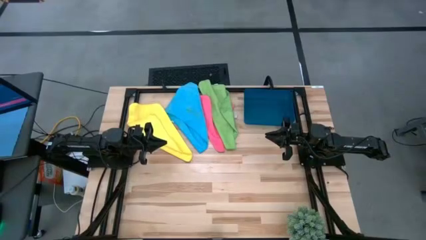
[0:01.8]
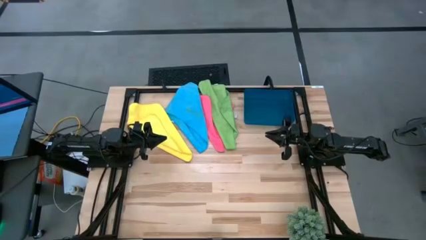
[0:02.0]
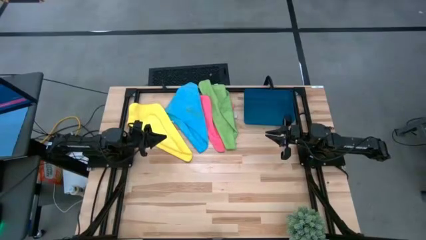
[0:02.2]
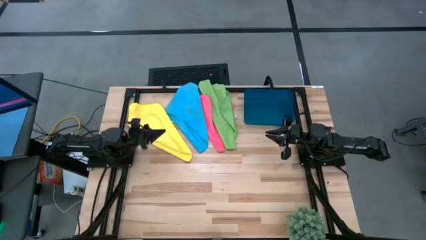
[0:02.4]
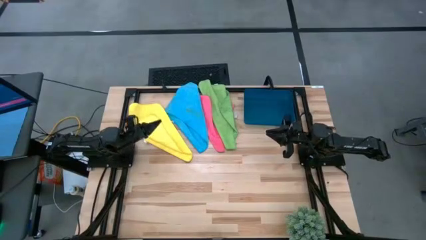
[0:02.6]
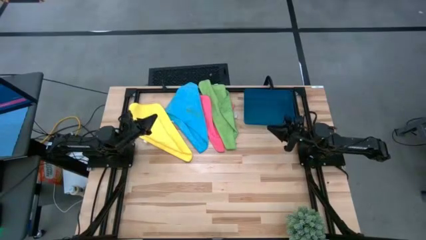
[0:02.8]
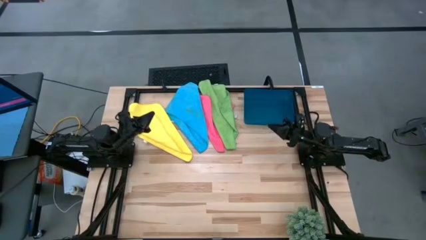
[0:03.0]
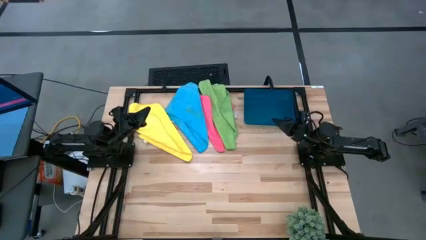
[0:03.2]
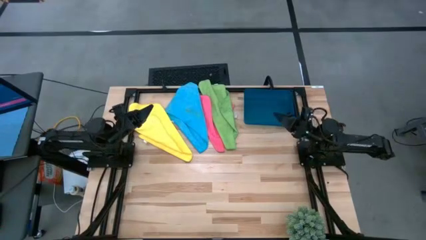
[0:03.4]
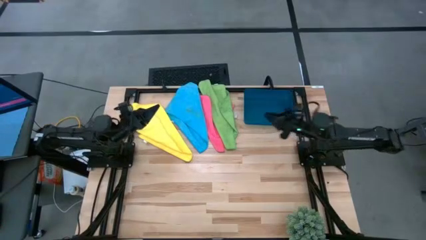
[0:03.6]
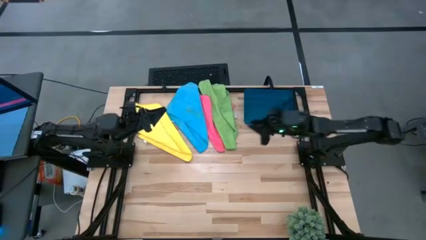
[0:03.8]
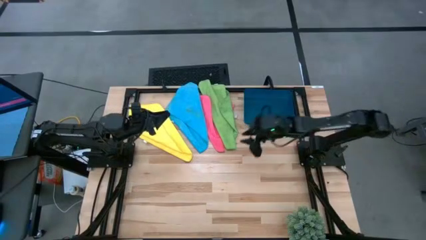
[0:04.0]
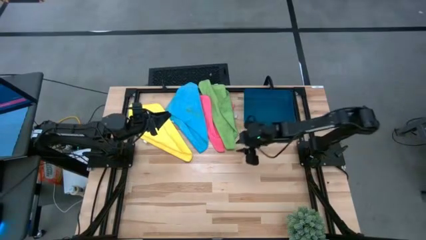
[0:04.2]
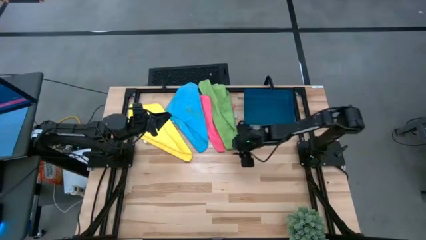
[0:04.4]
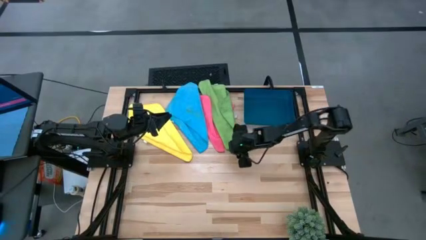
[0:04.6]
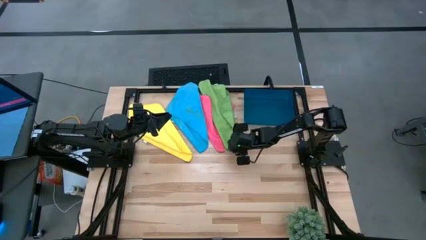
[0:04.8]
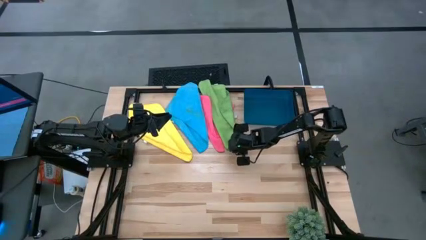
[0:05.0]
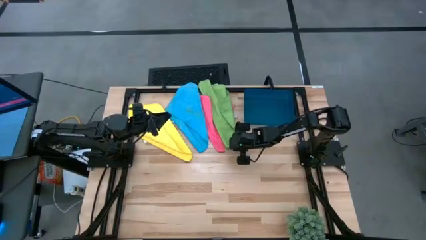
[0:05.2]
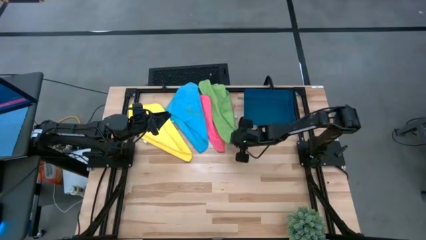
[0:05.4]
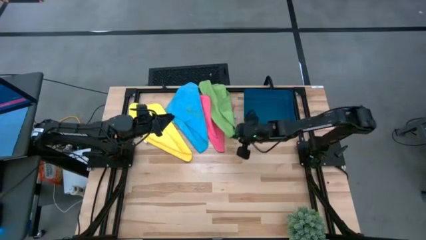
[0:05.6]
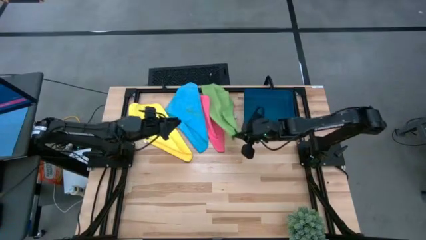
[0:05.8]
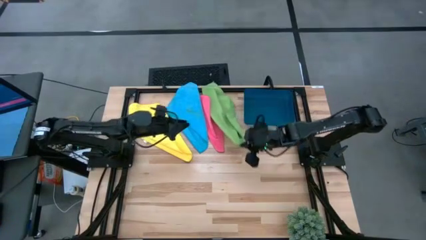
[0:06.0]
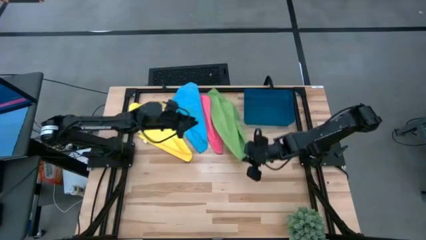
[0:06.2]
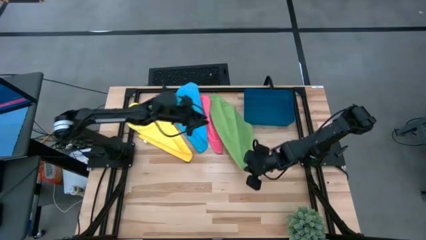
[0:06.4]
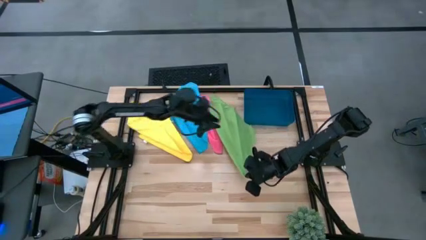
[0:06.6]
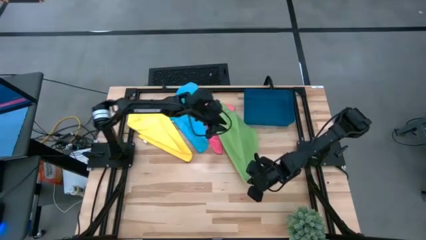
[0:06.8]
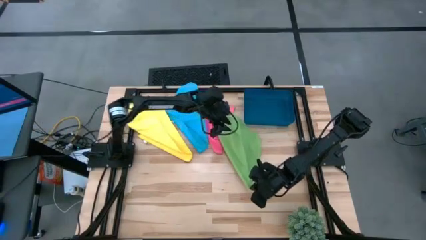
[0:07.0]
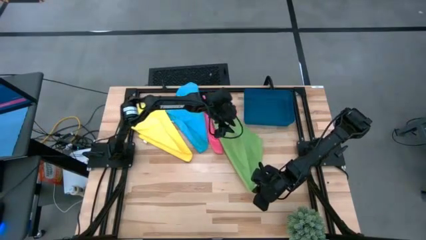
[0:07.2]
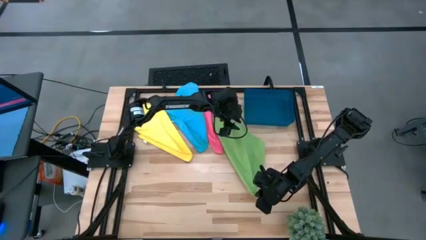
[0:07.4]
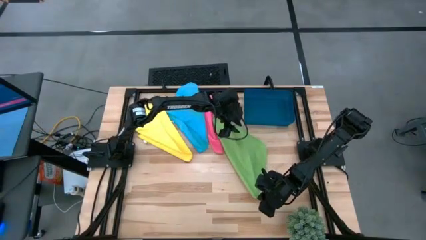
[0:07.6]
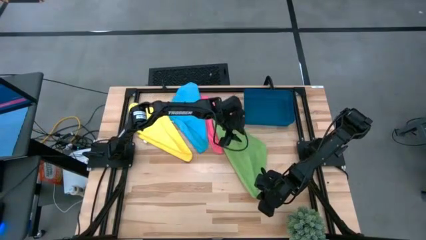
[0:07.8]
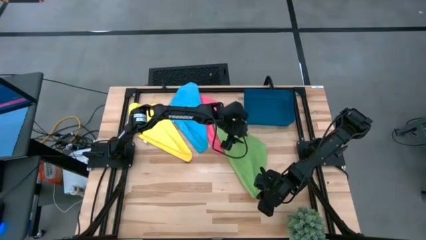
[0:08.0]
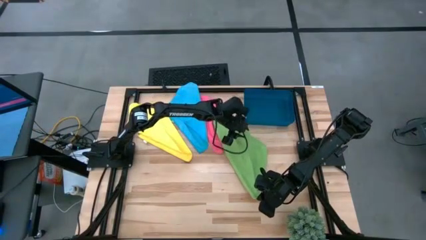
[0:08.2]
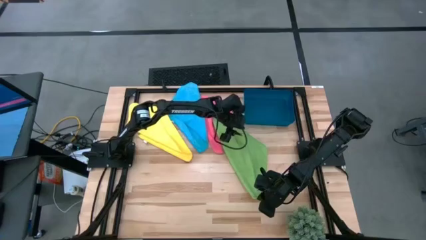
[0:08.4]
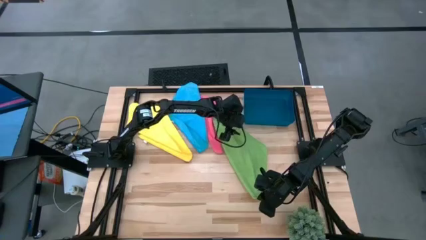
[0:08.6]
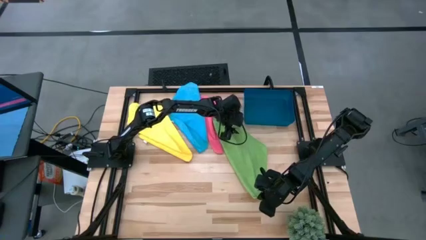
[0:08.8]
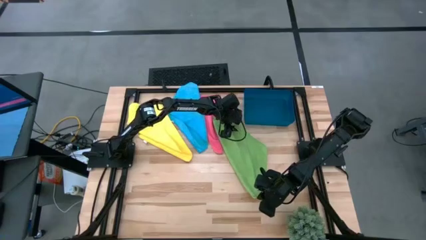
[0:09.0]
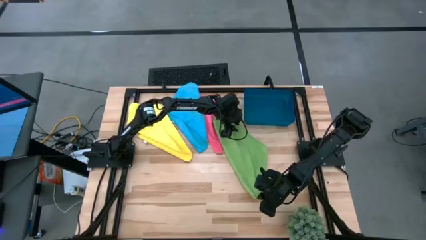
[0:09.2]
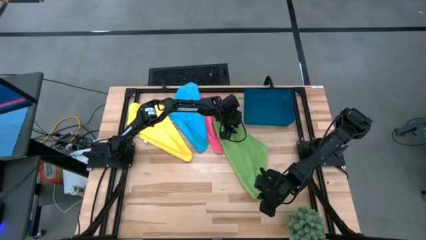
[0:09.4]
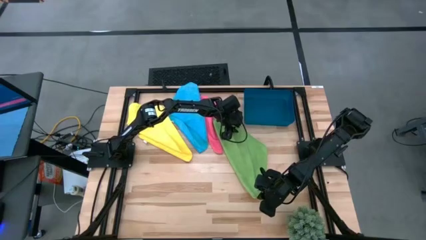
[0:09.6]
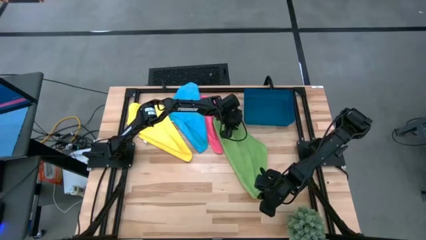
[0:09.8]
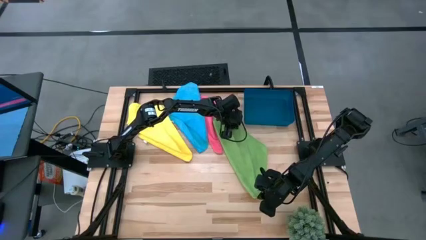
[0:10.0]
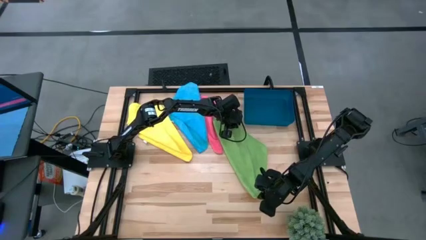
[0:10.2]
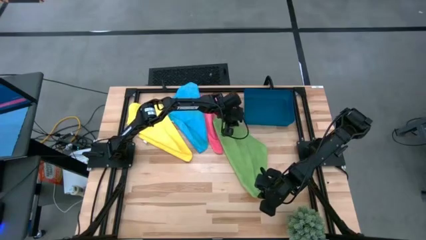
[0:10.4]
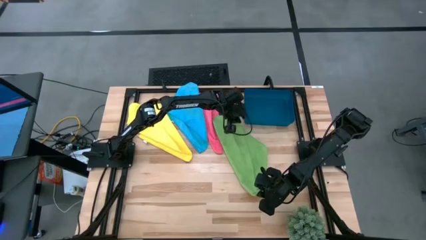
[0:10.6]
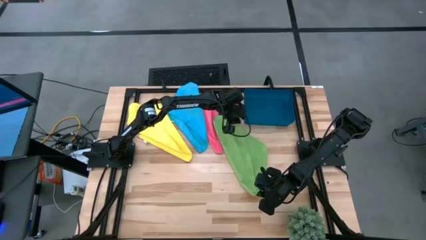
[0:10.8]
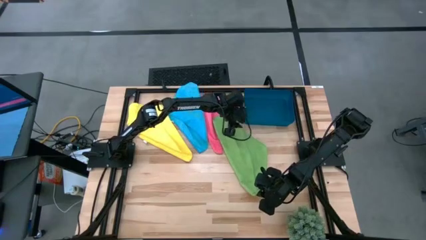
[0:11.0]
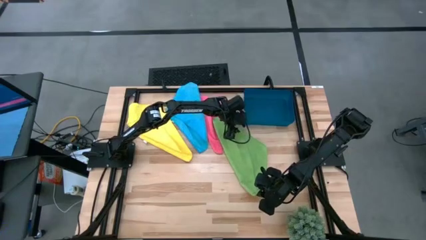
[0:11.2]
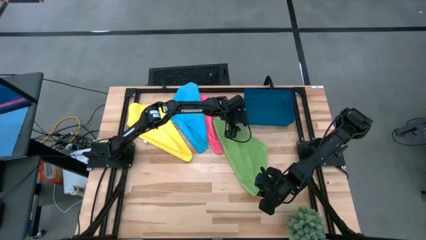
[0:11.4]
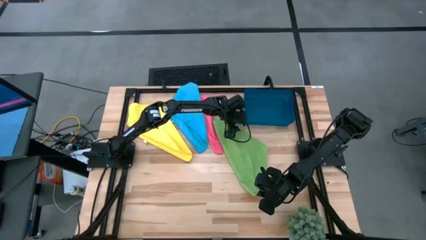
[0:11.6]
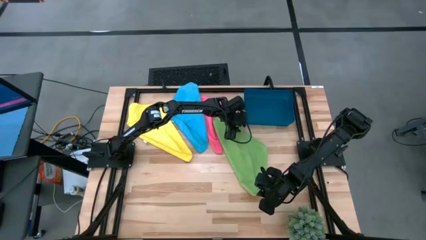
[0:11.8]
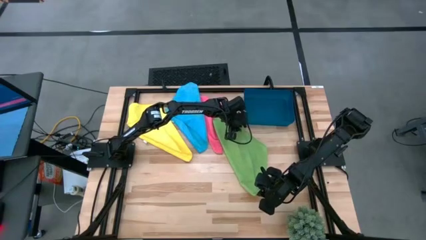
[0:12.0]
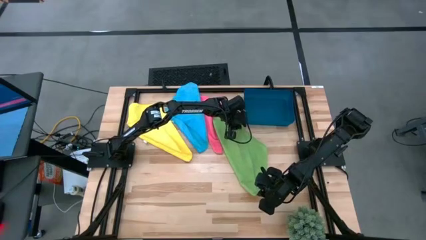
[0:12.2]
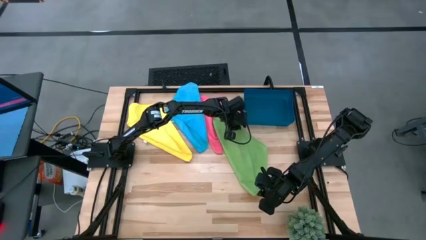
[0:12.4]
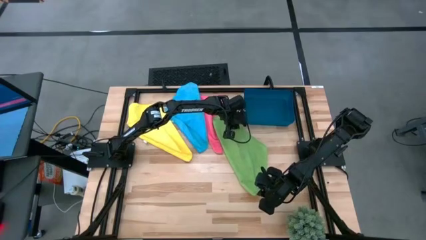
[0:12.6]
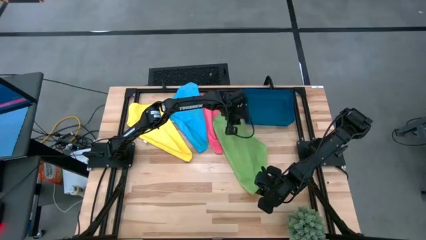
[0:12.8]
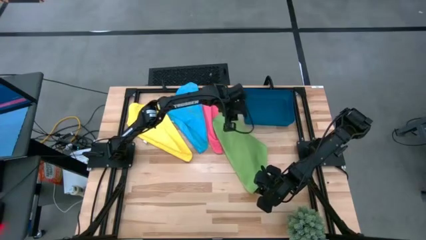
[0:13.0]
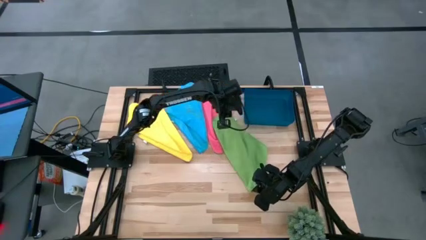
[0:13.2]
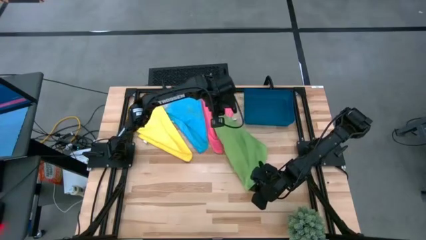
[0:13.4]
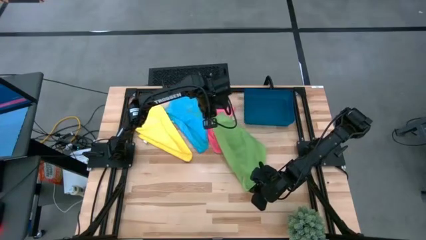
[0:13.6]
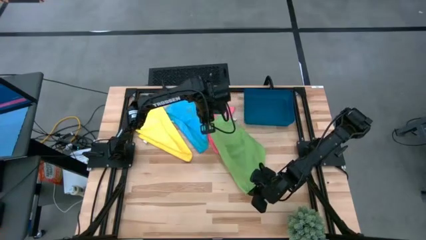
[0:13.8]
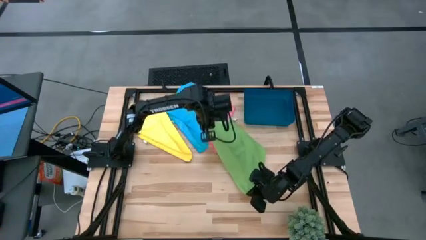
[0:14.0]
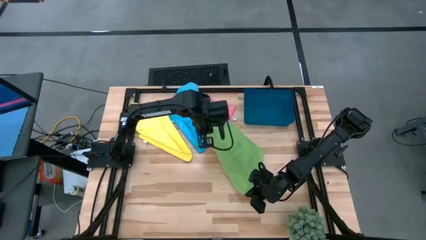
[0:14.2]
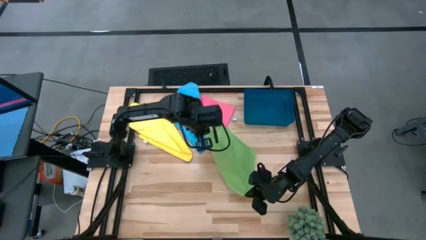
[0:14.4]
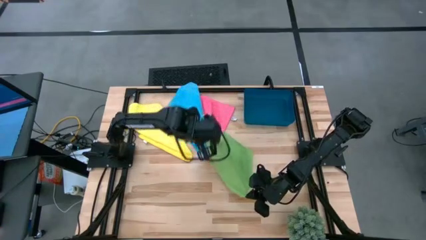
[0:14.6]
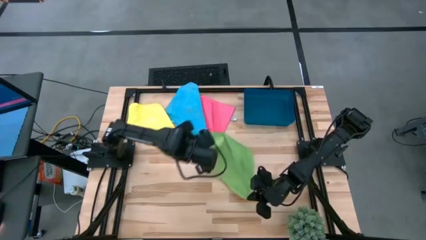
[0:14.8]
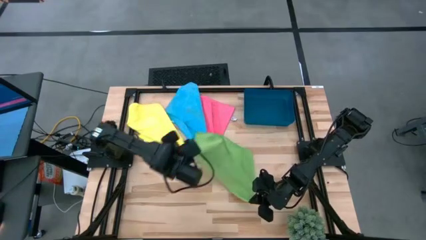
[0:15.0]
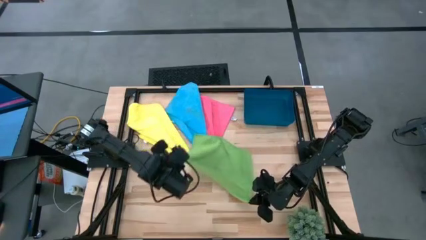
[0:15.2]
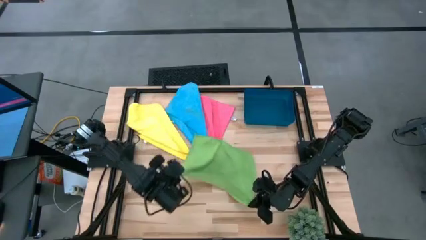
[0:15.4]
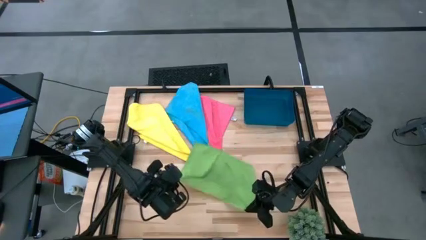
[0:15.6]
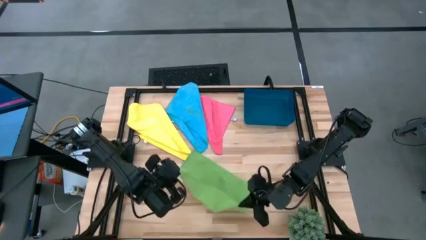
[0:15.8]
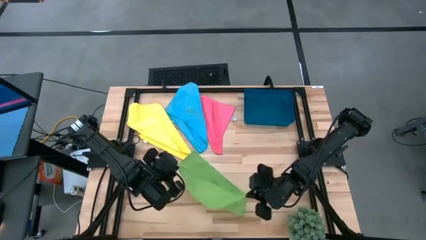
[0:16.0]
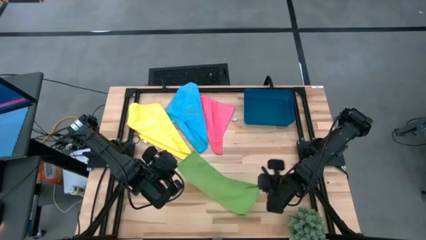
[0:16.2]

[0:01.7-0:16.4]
Task: Fold microfiber towels
Fold the green microfiber towel
